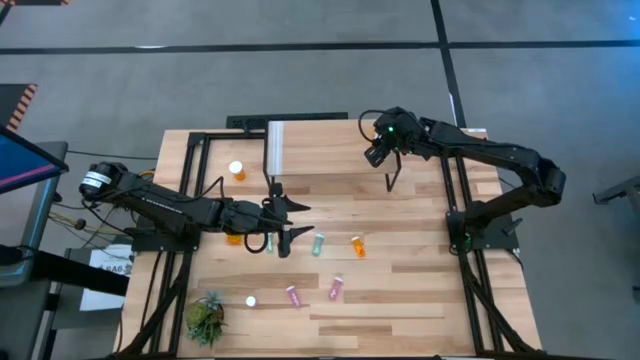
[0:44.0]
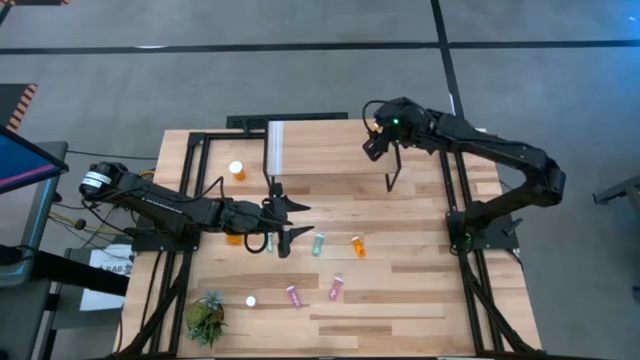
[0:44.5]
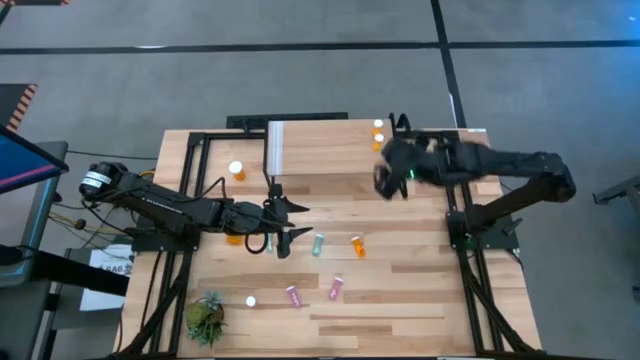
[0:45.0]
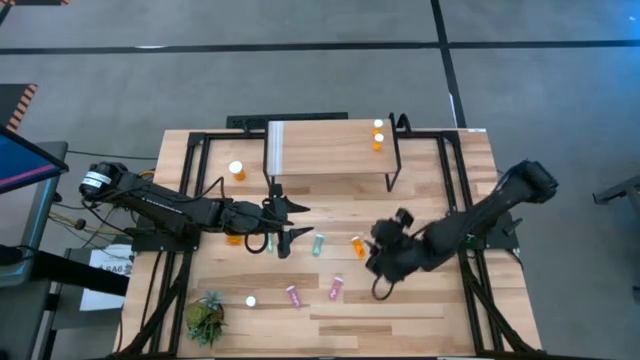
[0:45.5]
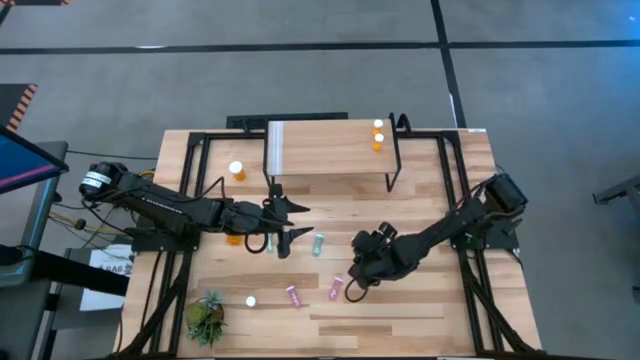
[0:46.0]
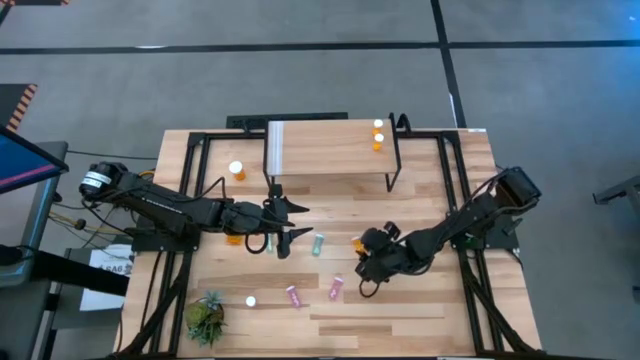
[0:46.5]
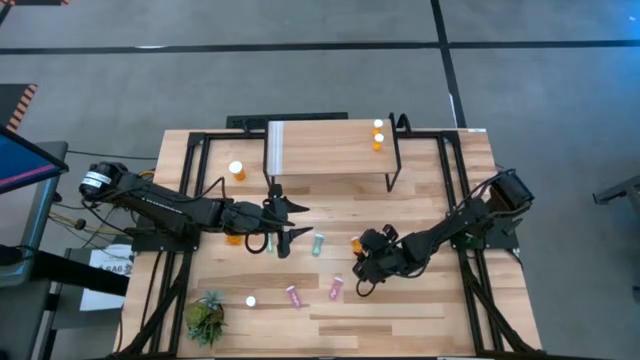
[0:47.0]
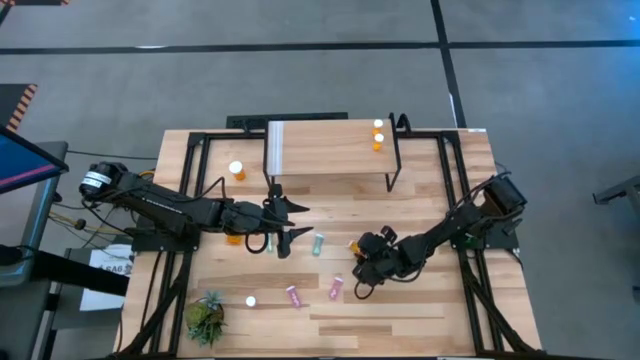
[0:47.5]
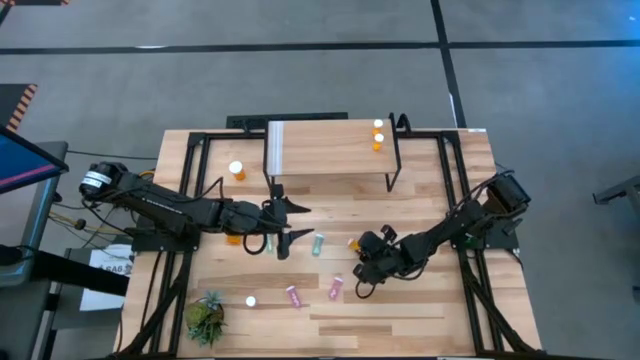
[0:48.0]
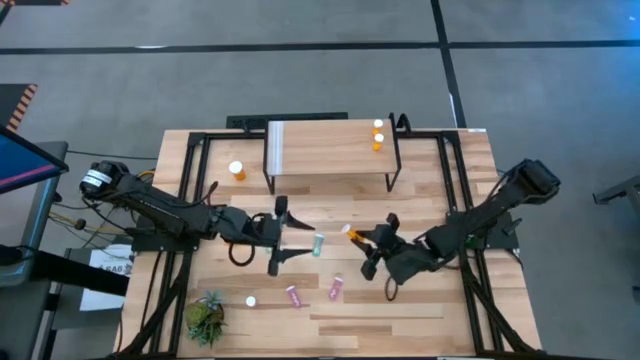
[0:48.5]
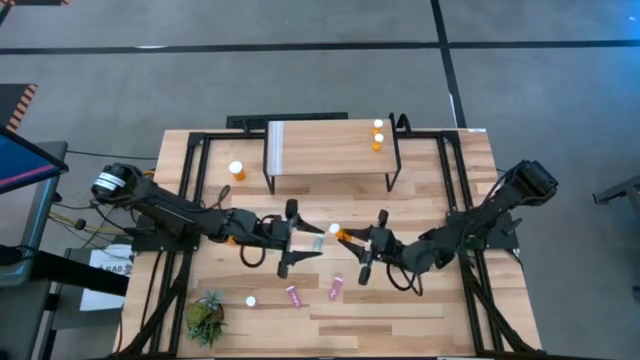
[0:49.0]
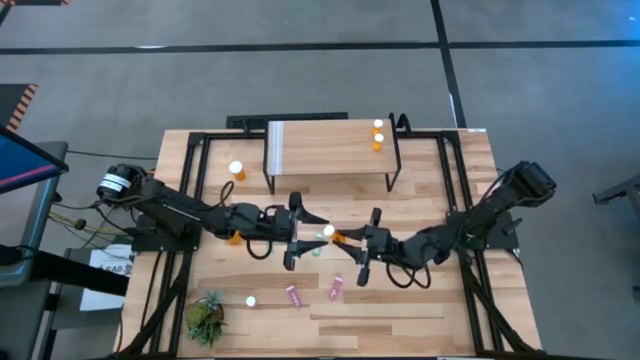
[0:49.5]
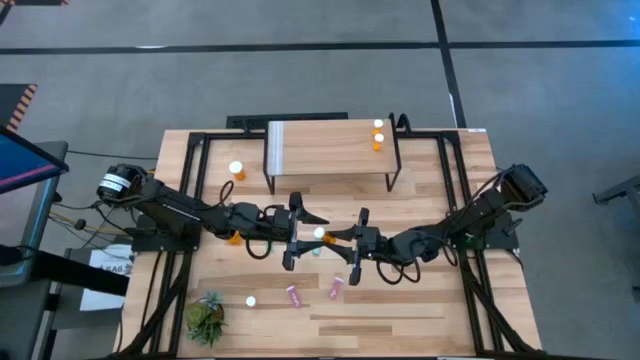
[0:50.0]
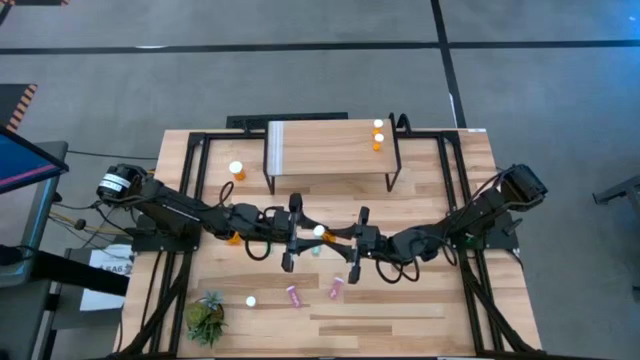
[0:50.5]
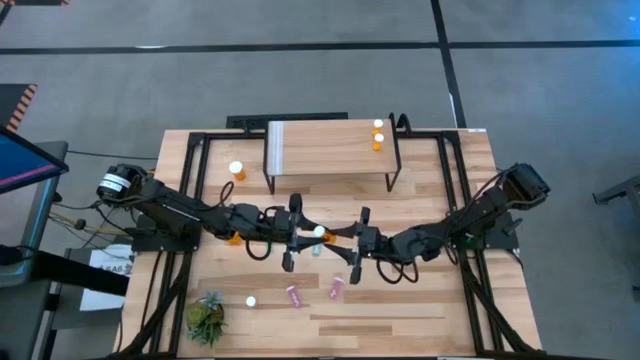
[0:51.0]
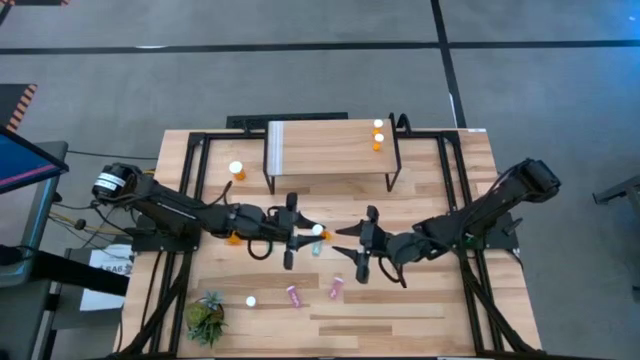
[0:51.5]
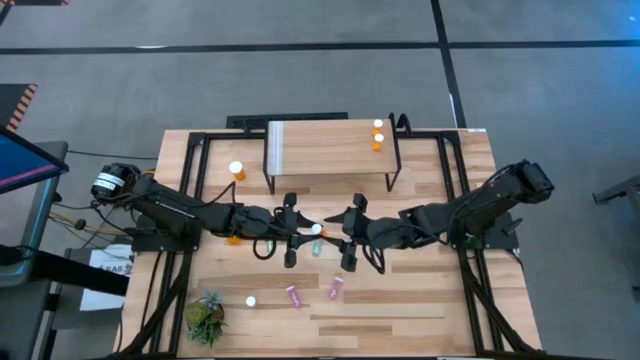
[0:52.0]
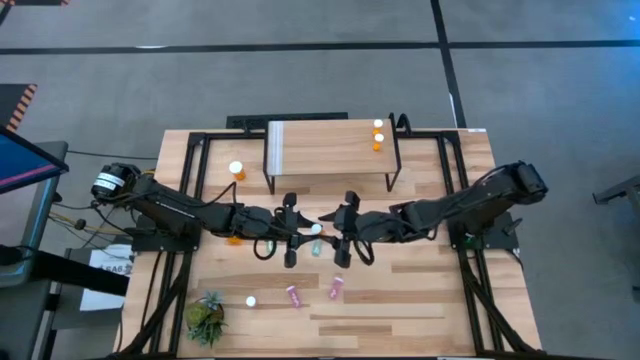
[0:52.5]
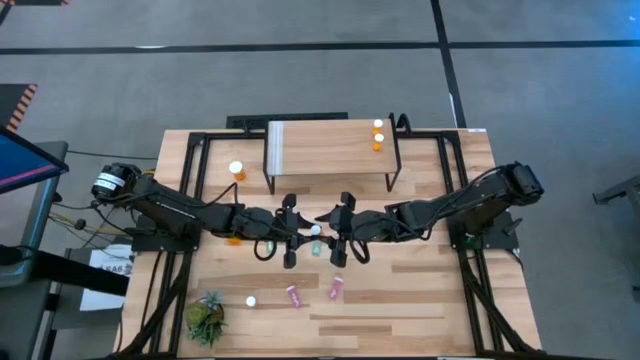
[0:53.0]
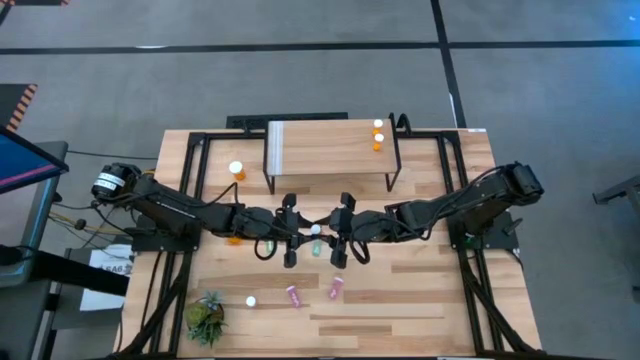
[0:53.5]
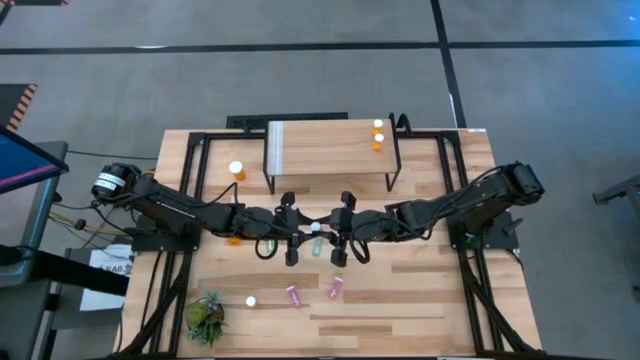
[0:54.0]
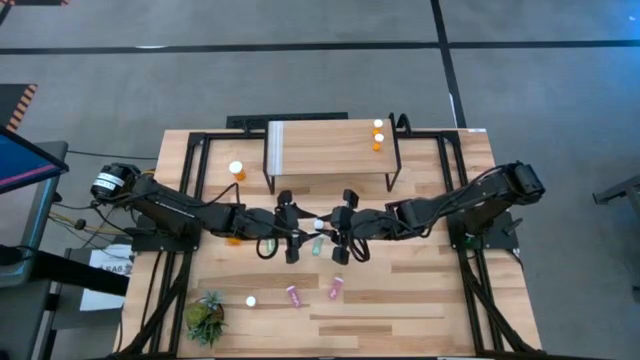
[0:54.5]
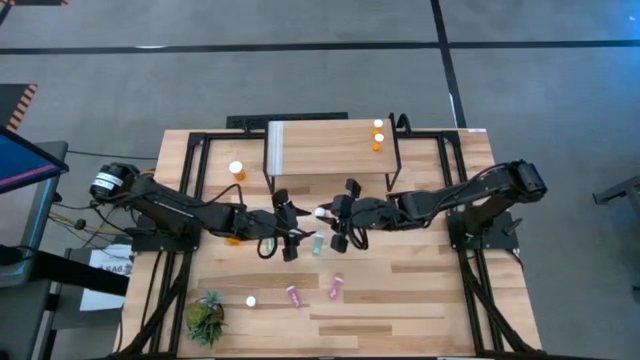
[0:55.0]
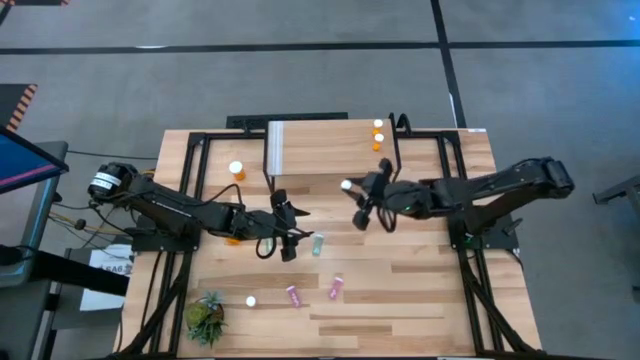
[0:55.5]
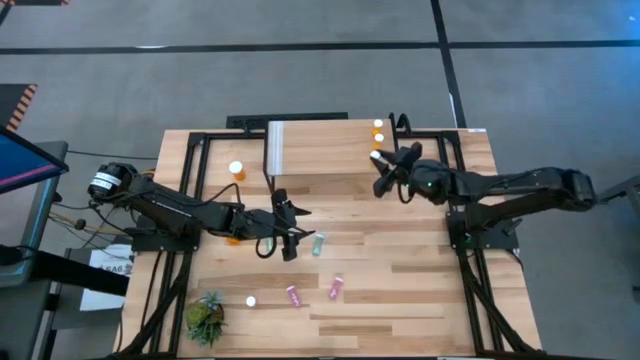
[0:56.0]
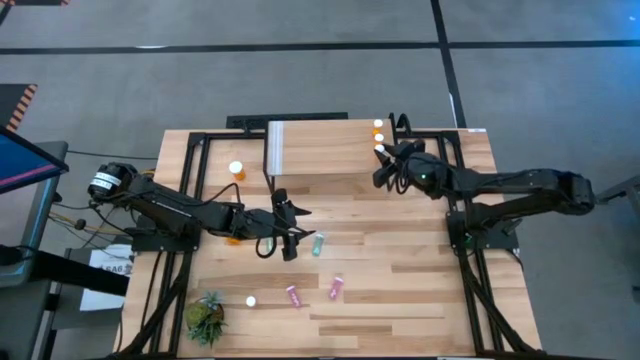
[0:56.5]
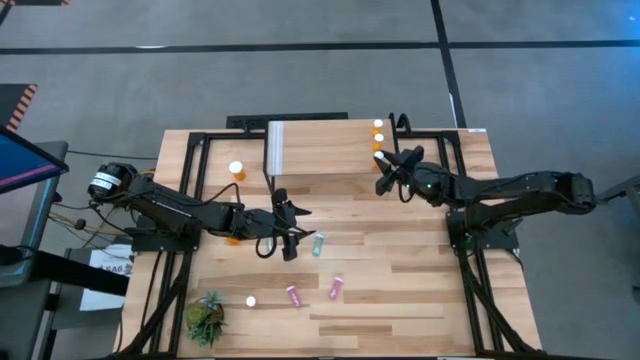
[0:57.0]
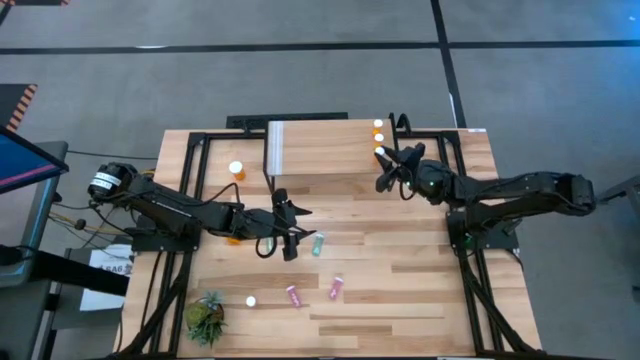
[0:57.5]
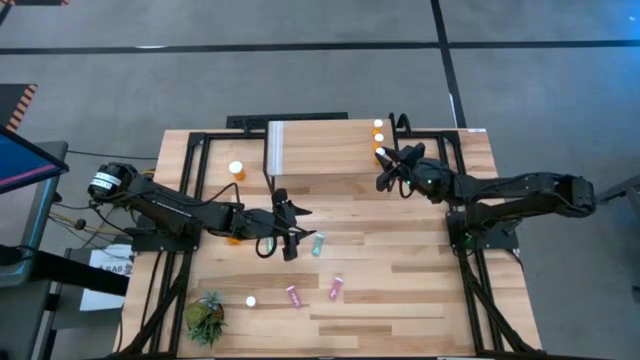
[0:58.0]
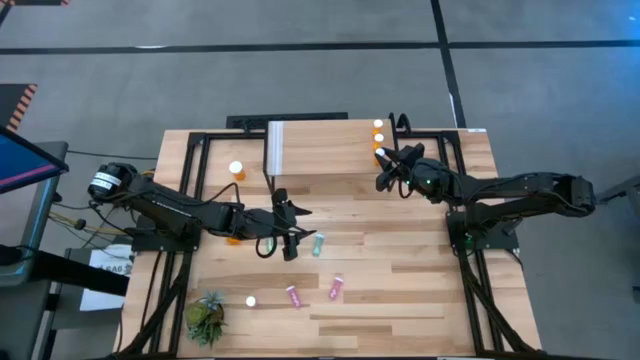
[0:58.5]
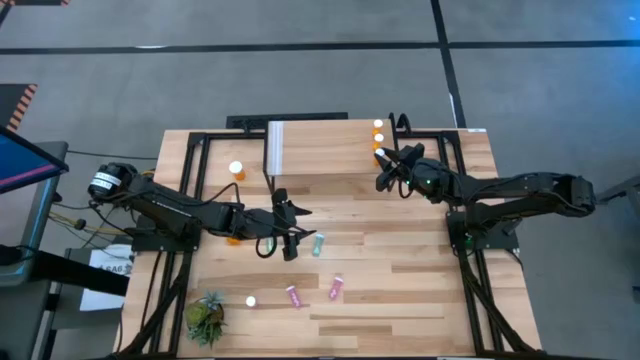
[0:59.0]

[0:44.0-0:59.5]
Task: Pick and place medicine bottles onto shelf by color
Put the small orange pill bottle on the shelf aligned with the other small orange pill bottle

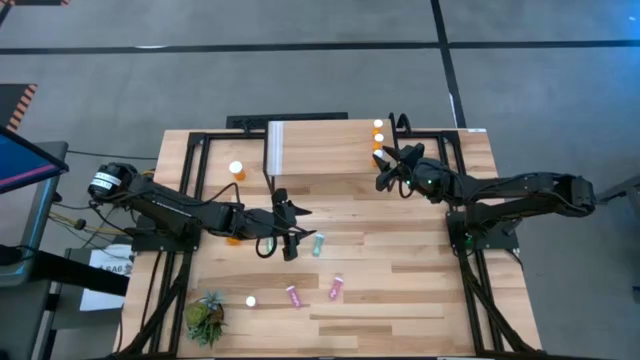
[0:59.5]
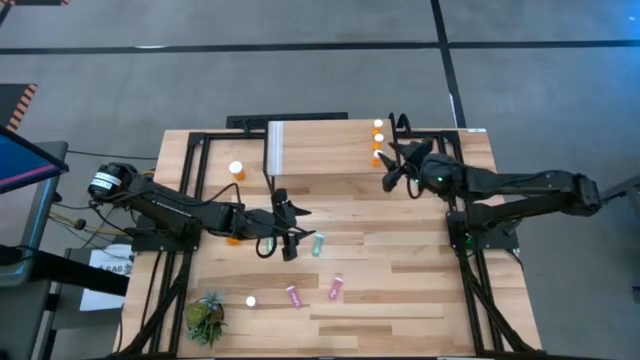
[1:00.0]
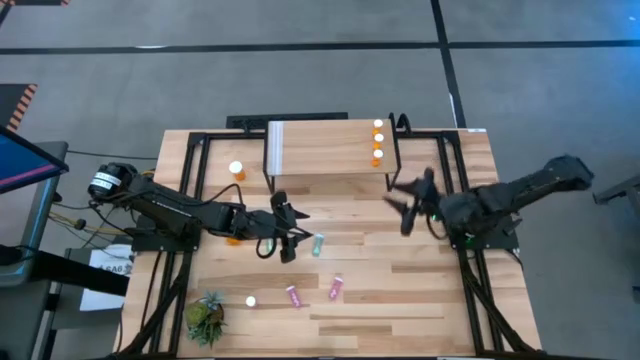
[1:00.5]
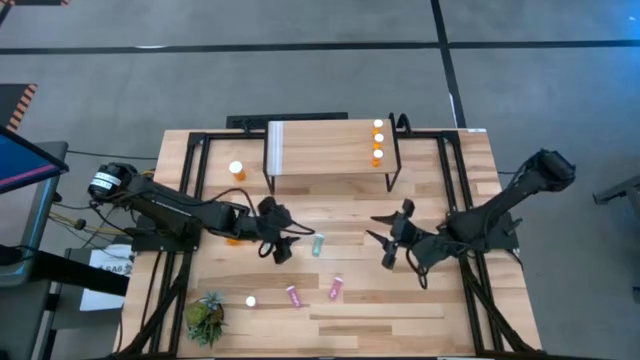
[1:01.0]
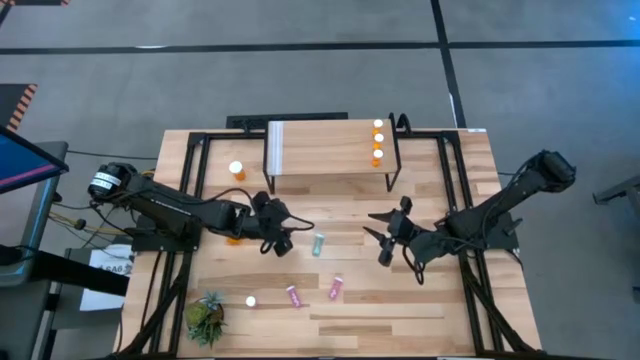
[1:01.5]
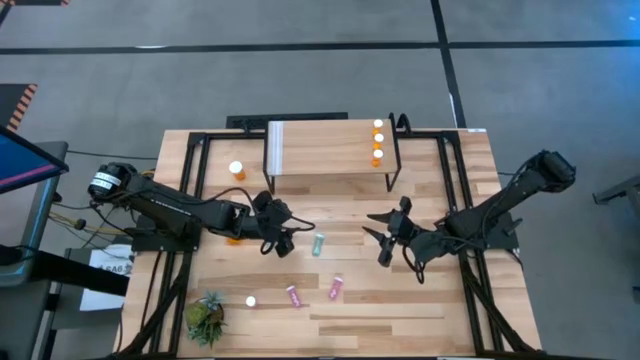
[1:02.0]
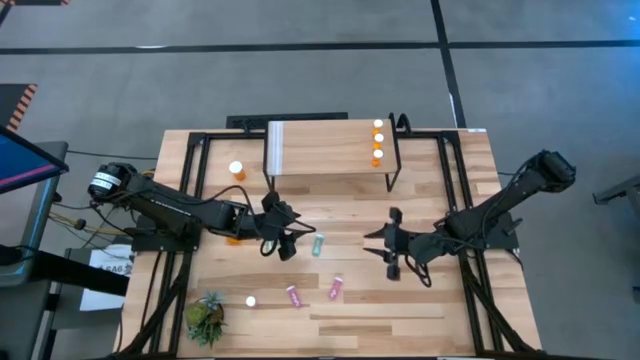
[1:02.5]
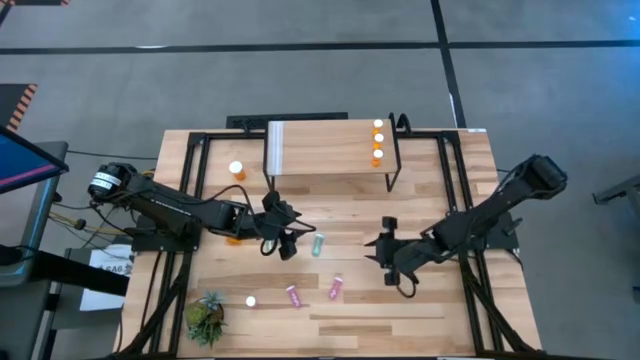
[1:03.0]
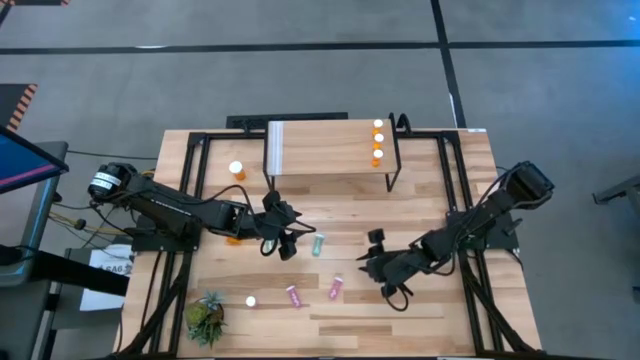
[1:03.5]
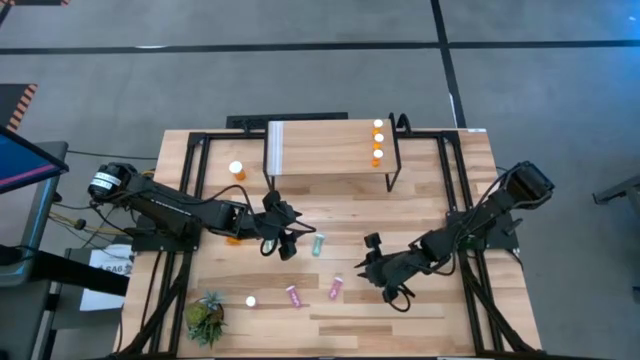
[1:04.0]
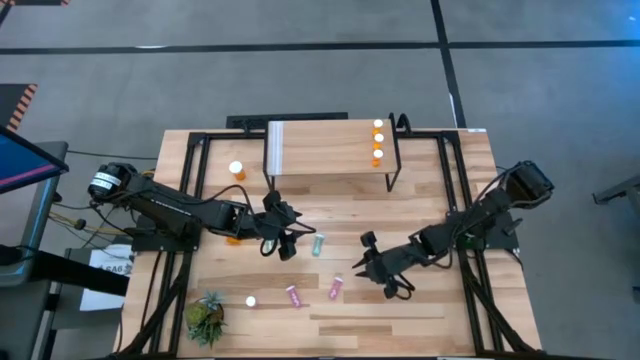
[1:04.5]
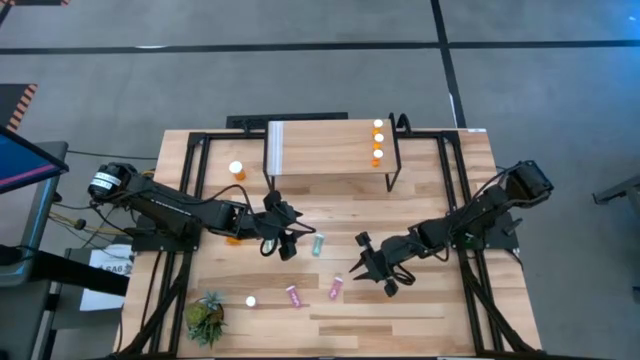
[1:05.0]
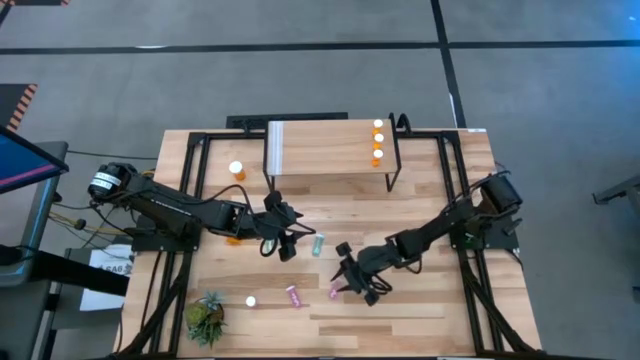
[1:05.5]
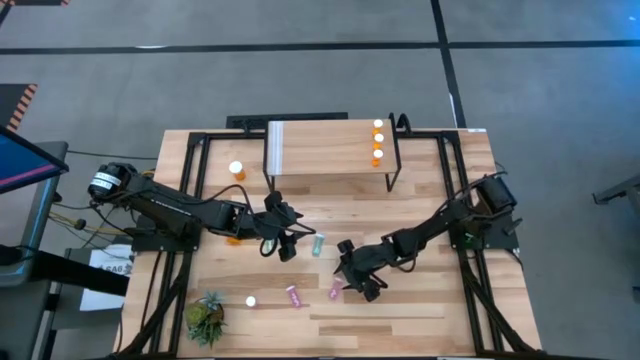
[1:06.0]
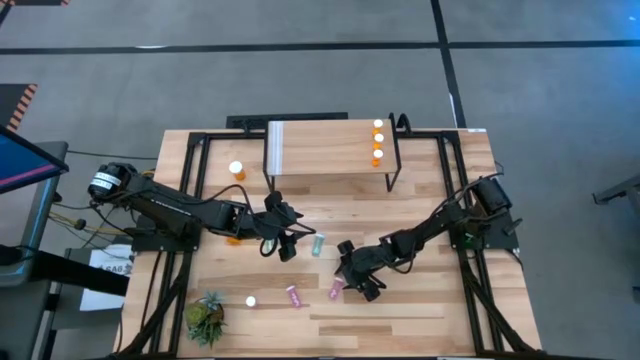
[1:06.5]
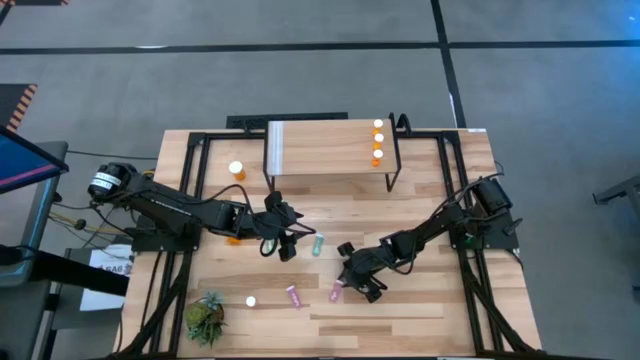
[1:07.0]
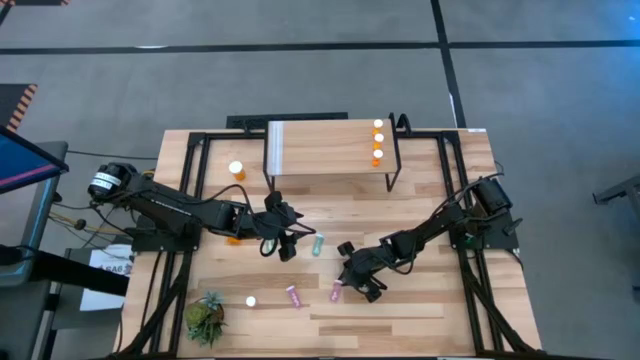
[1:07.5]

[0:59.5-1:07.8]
Put the right pink pill bottle on the shelf
